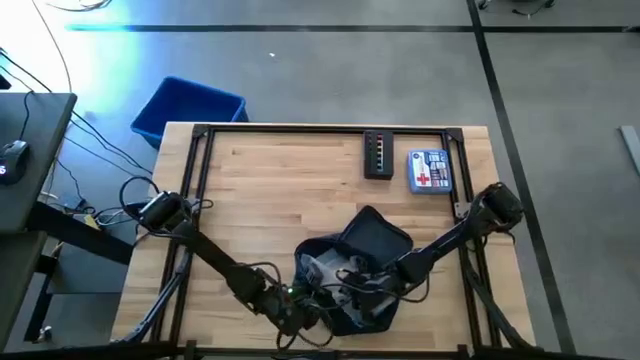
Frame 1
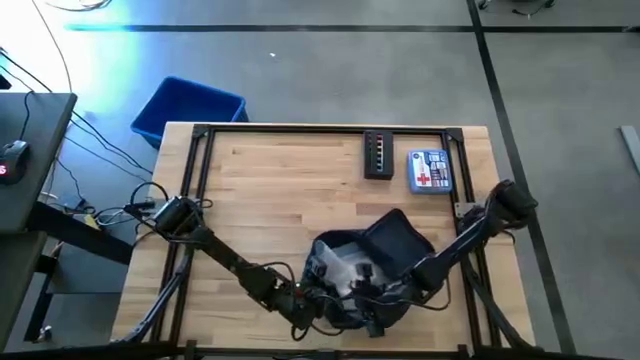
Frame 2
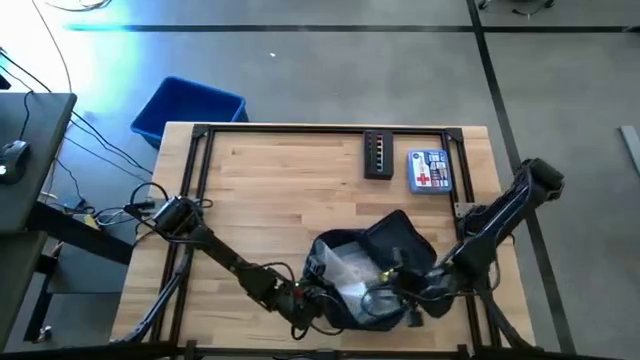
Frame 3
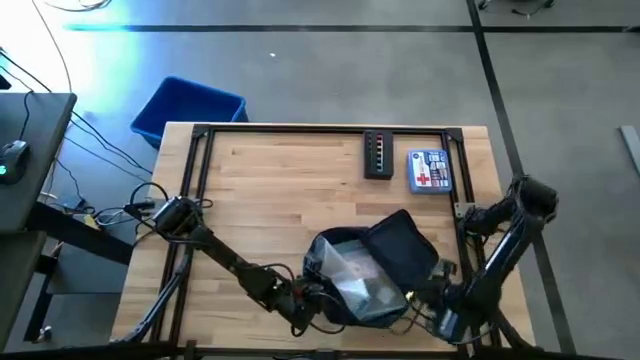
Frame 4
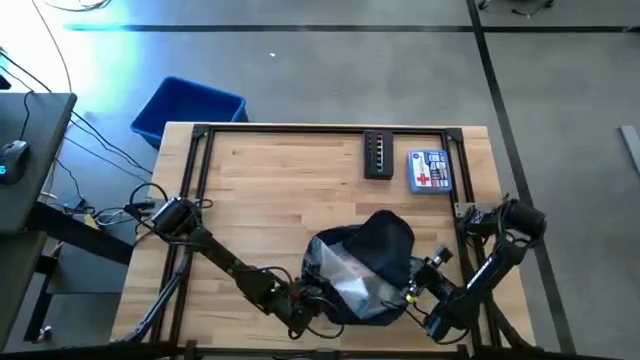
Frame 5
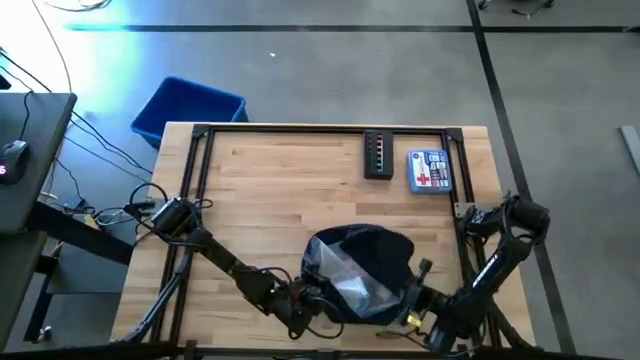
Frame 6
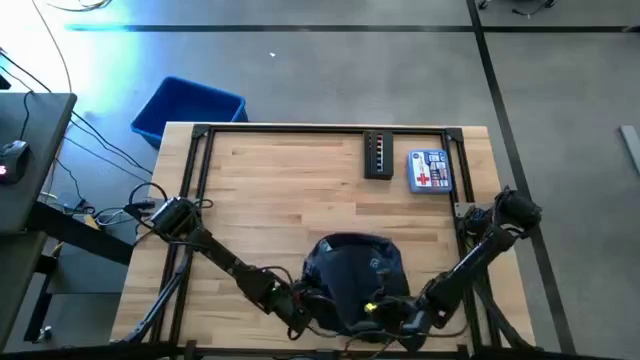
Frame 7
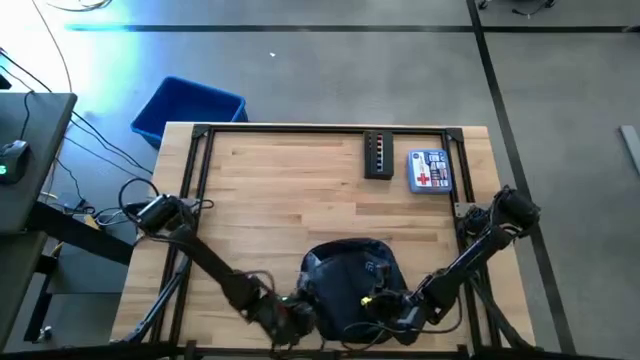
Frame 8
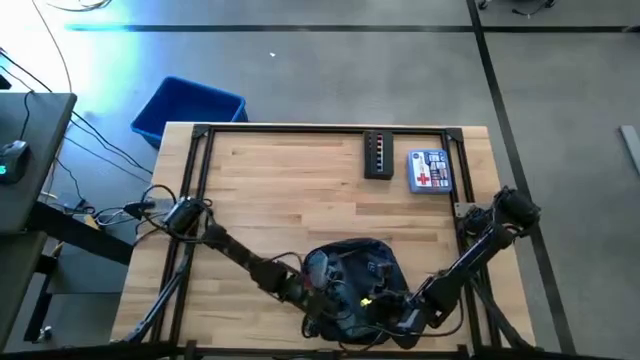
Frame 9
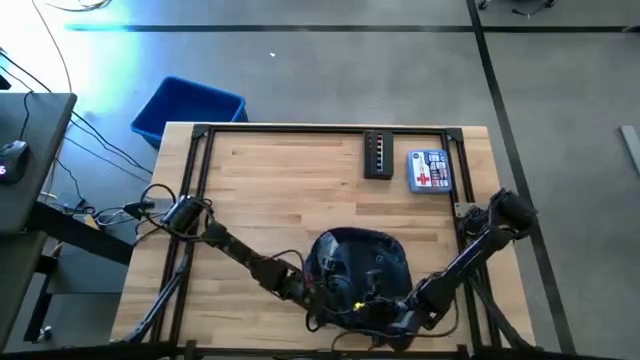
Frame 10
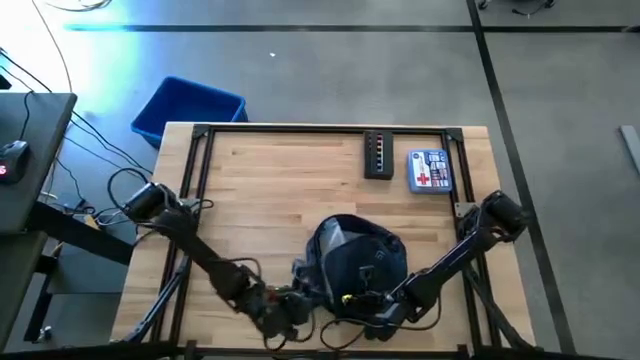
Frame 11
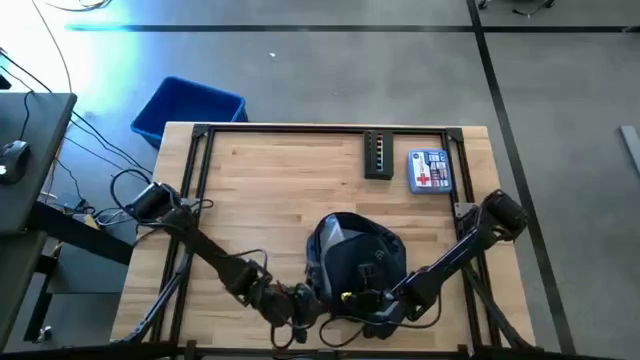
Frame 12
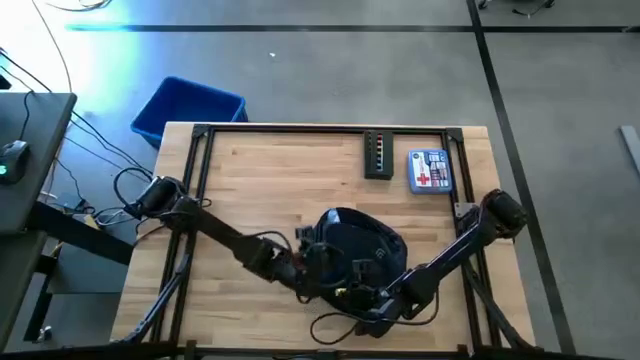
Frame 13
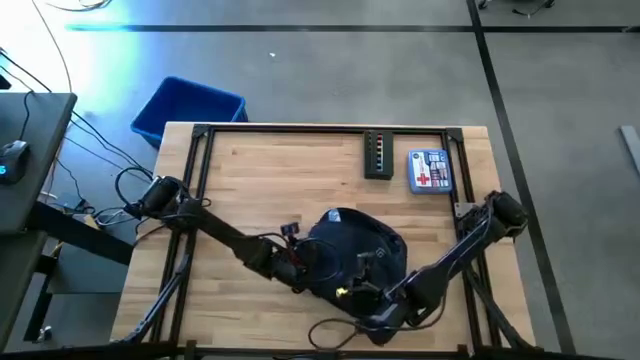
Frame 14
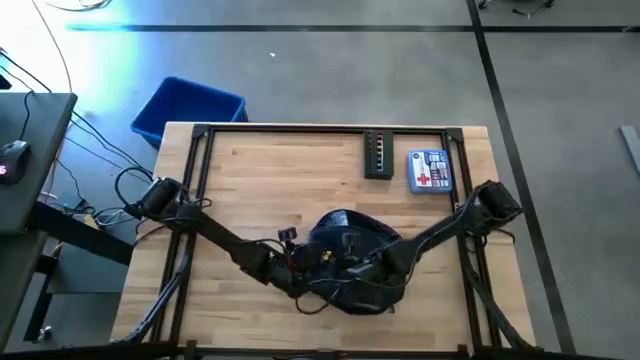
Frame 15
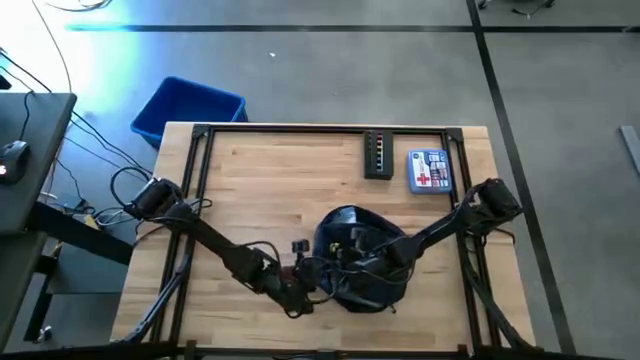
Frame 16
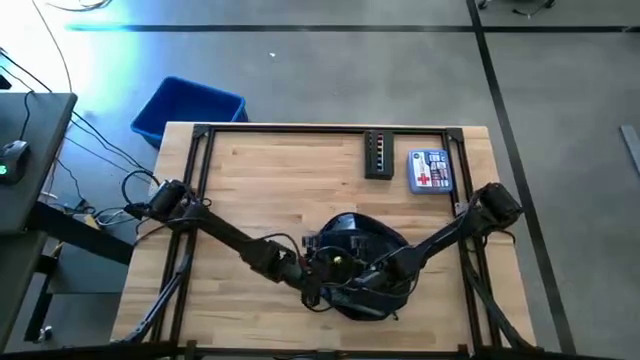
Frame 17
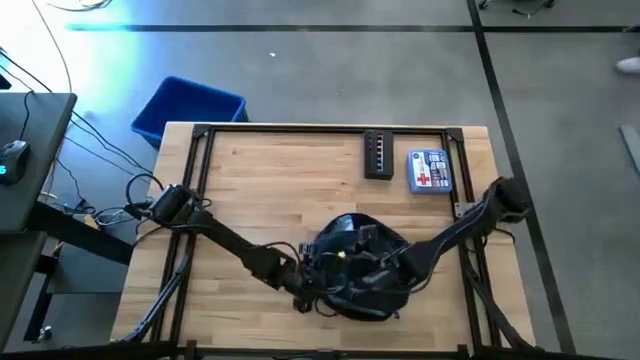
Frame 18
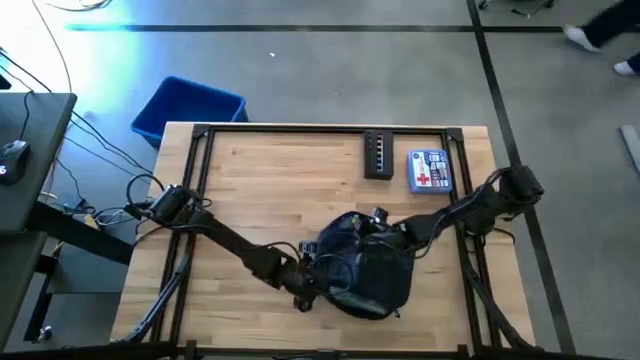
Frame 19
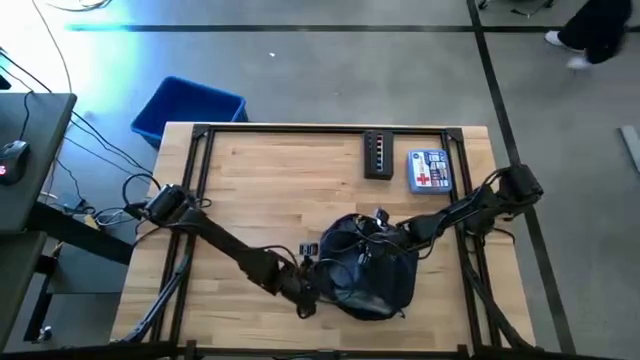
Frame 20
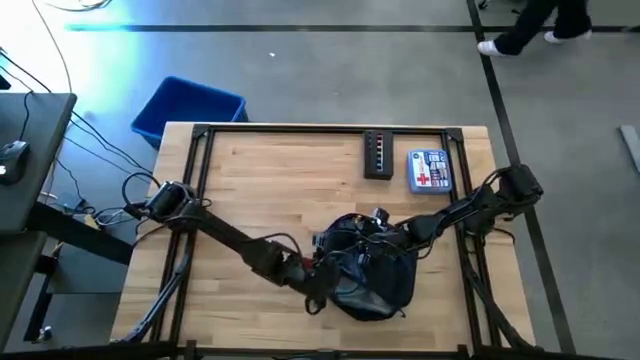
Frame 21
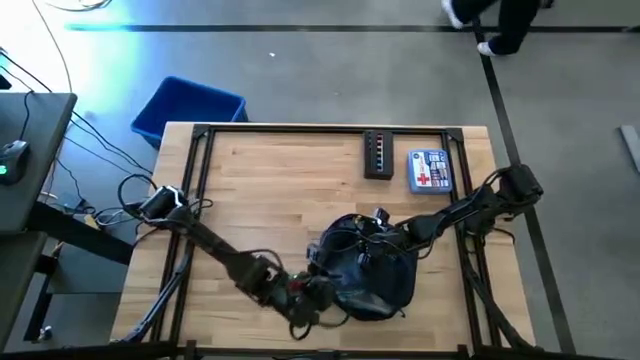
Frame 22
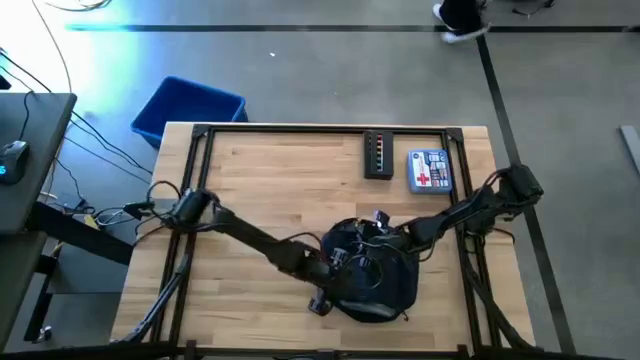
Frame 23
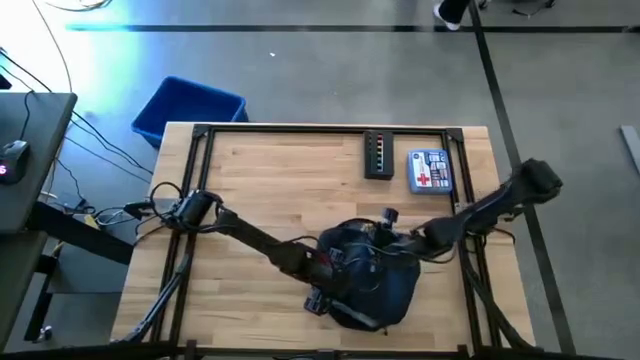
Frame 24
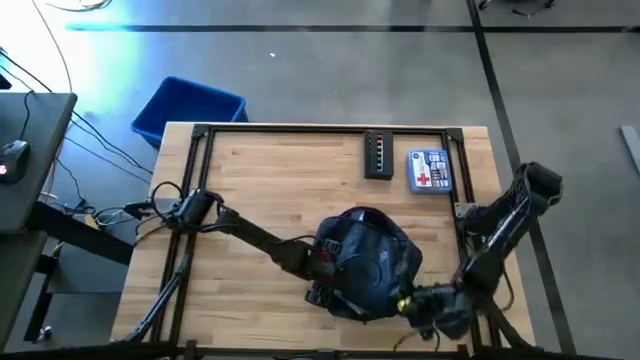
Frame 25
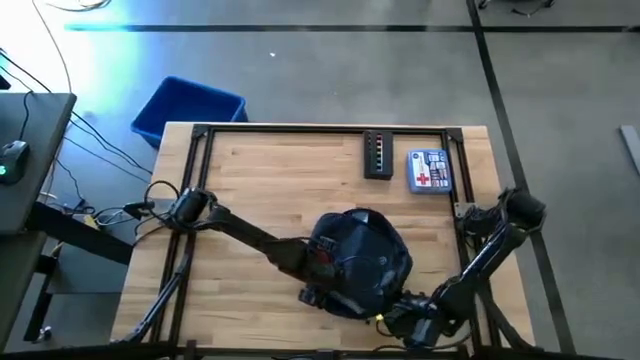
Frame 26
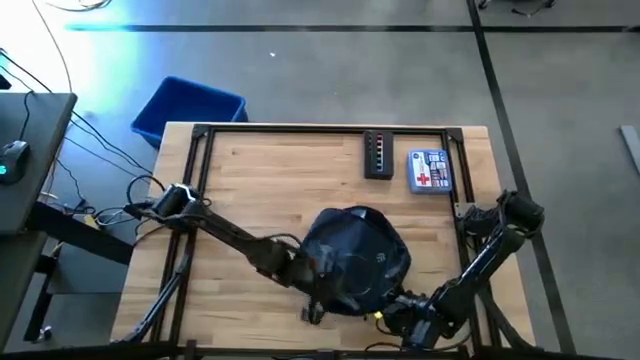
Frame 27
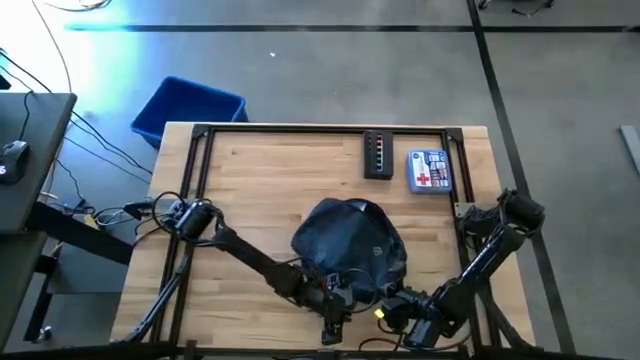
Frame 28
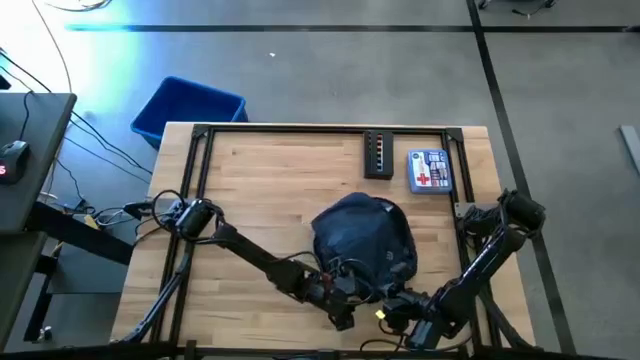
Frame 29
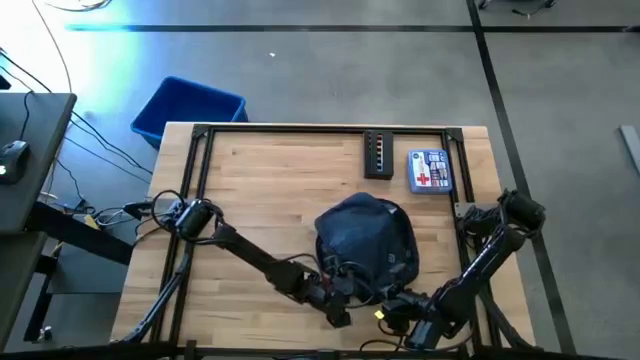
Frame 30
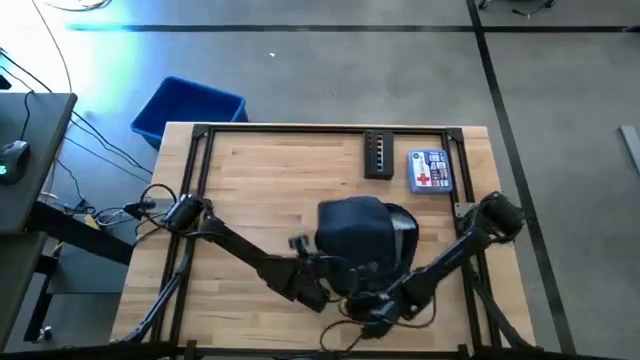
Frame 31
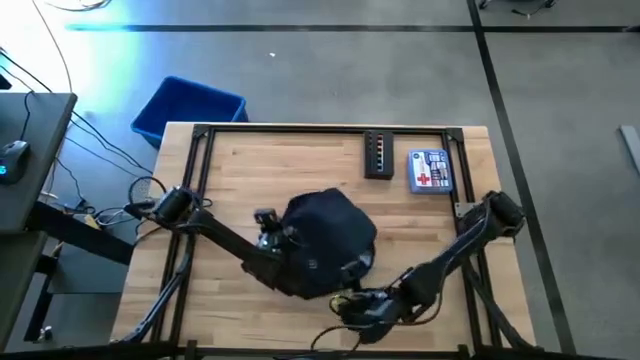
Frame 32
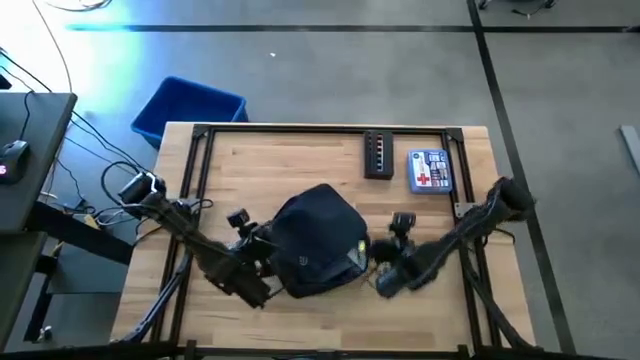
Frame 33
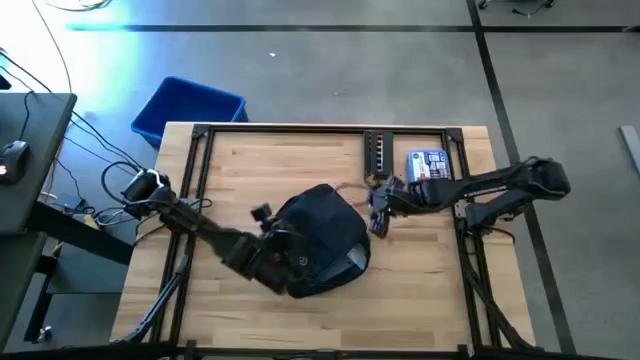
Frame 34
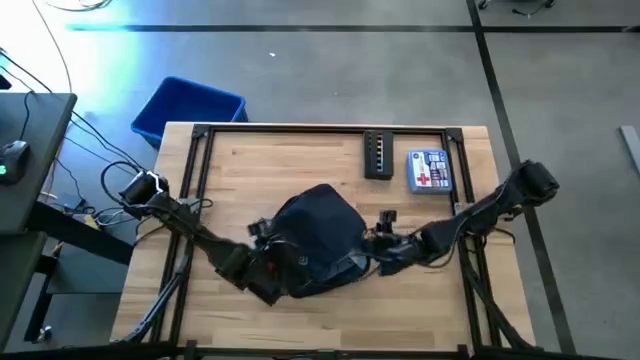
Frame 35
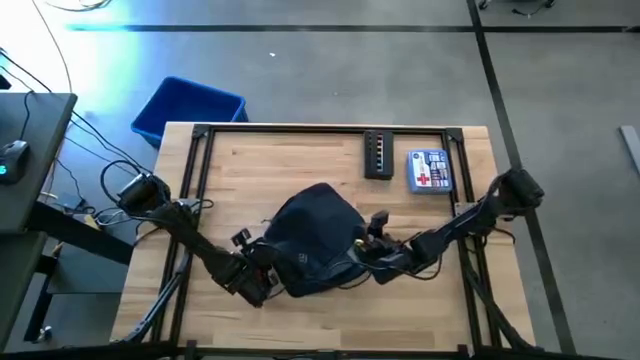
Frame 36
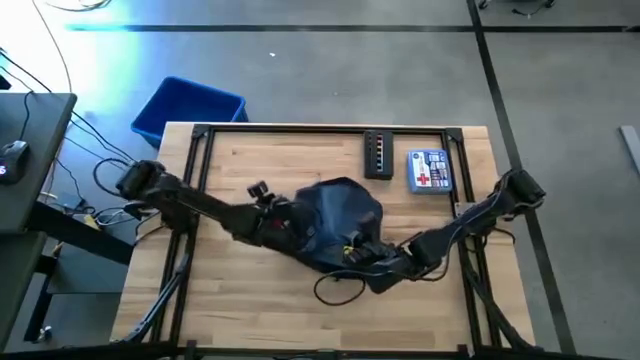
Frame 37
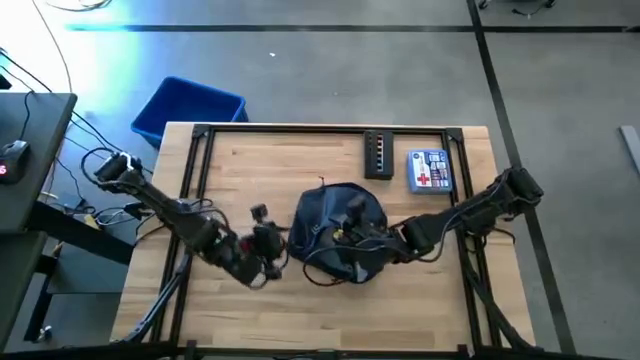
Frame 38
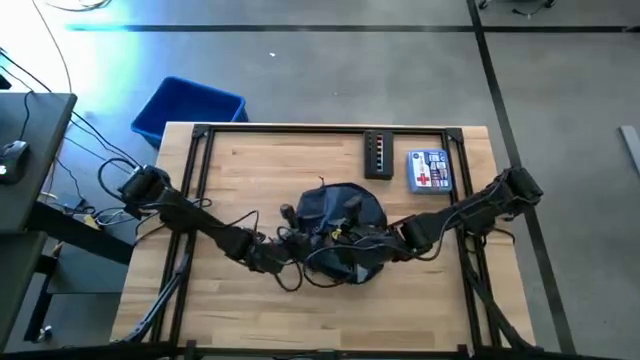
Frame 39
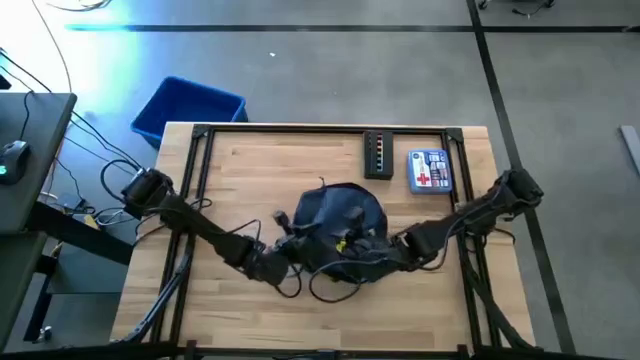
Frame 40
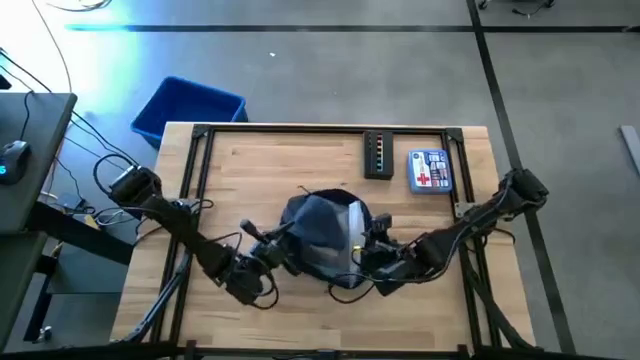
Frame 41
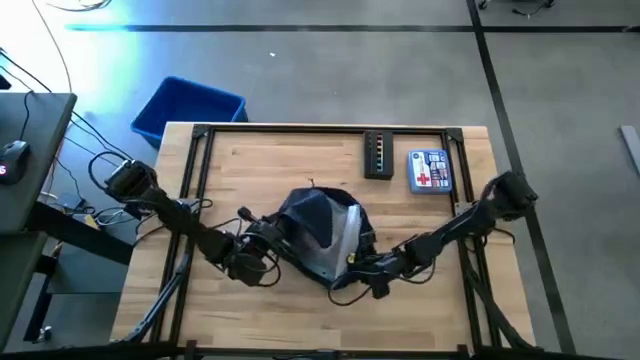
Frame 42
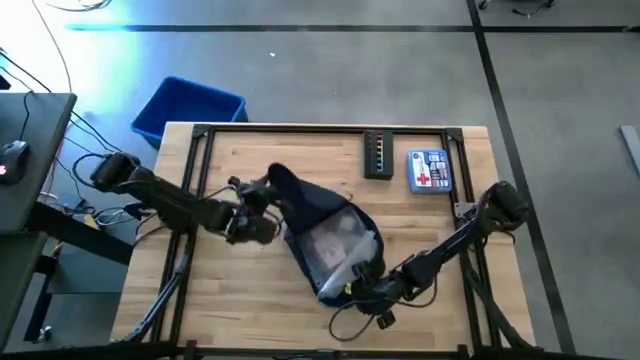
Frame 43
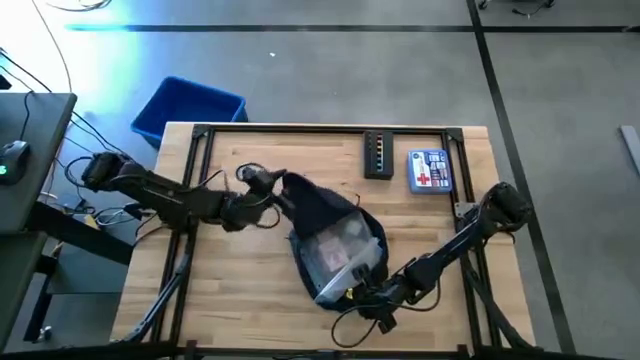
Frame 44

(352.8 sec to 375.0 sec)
Task: Unpack backpack
Put the white zip bag into the backpack
